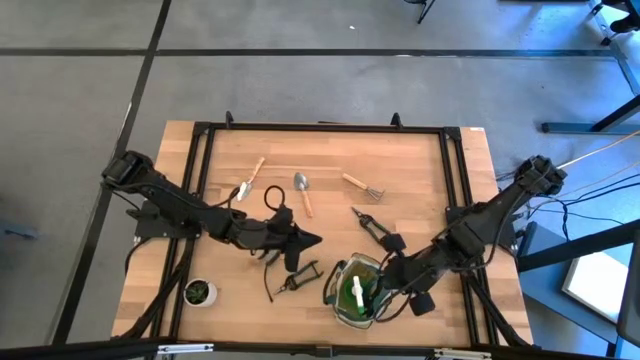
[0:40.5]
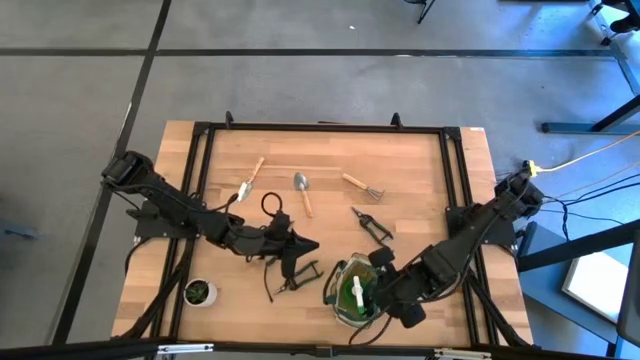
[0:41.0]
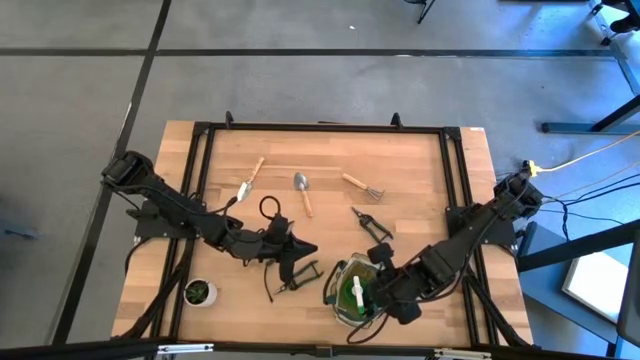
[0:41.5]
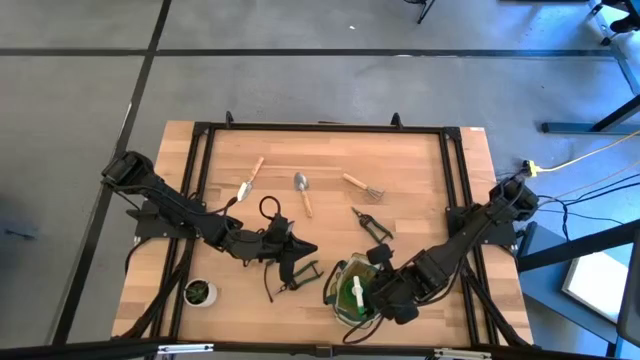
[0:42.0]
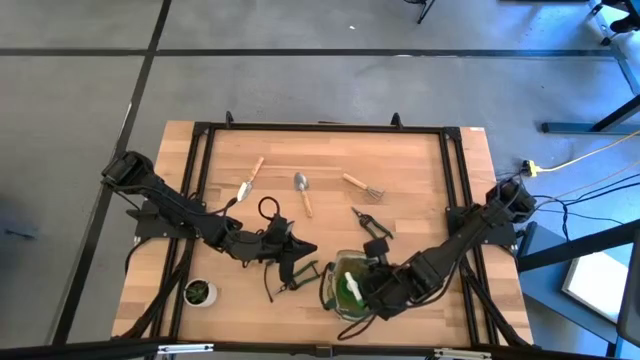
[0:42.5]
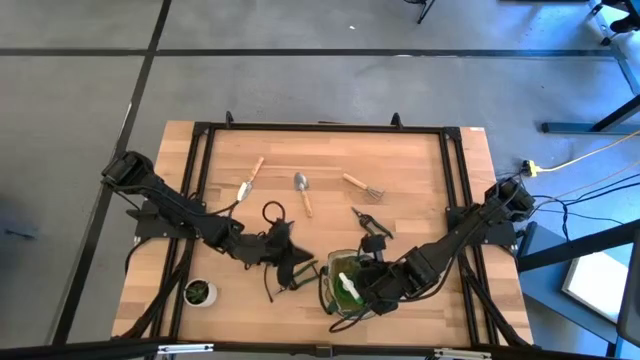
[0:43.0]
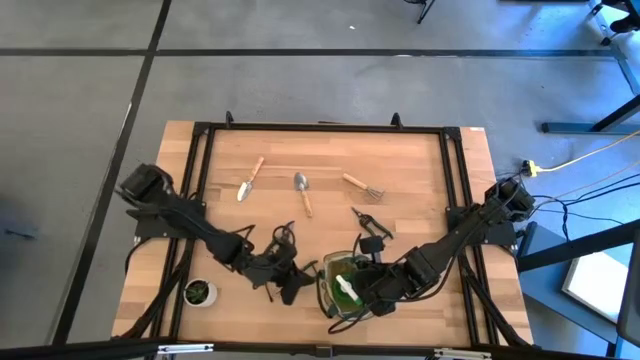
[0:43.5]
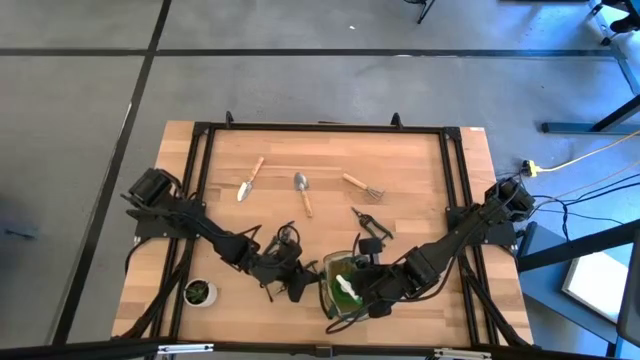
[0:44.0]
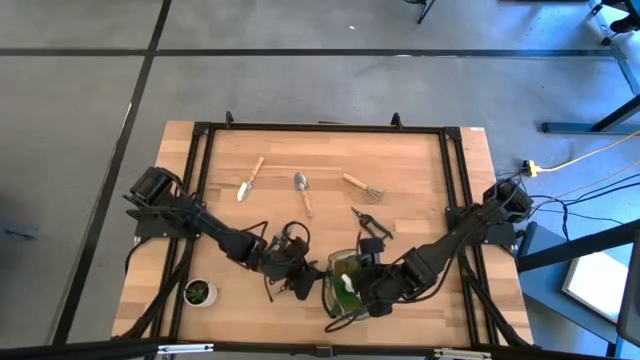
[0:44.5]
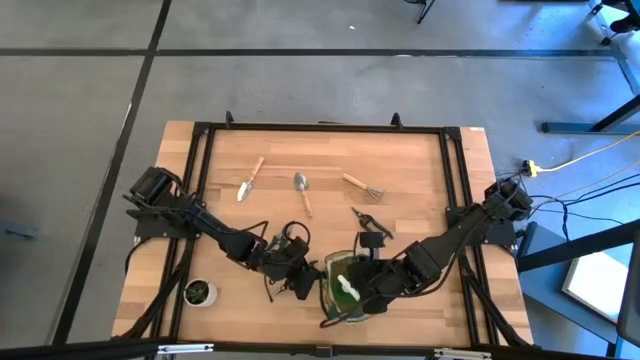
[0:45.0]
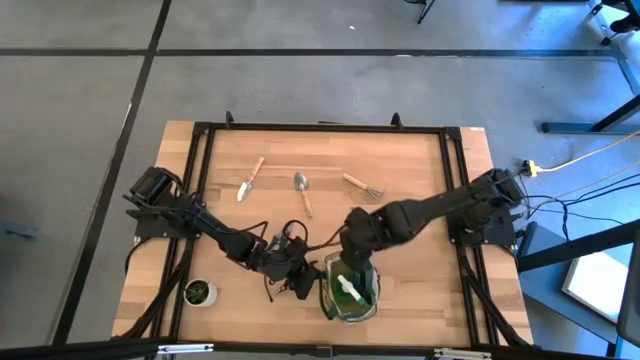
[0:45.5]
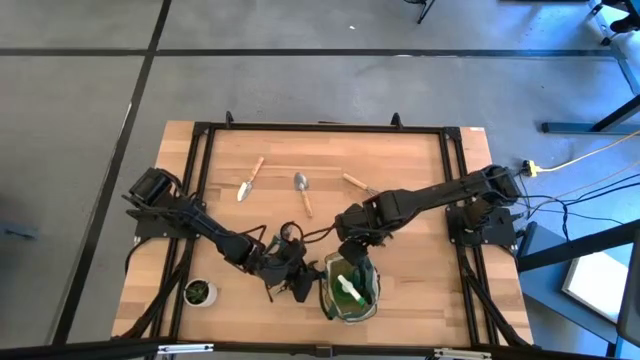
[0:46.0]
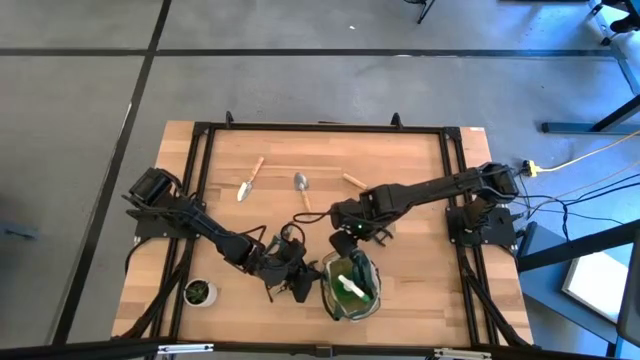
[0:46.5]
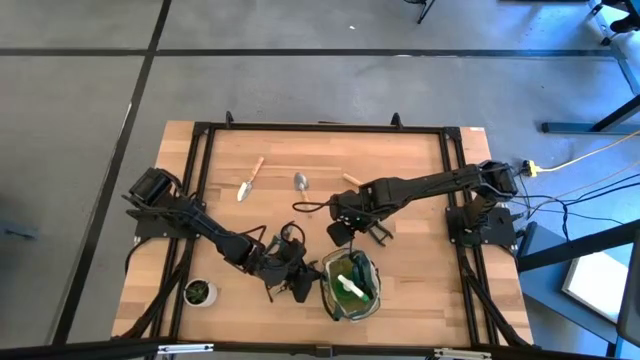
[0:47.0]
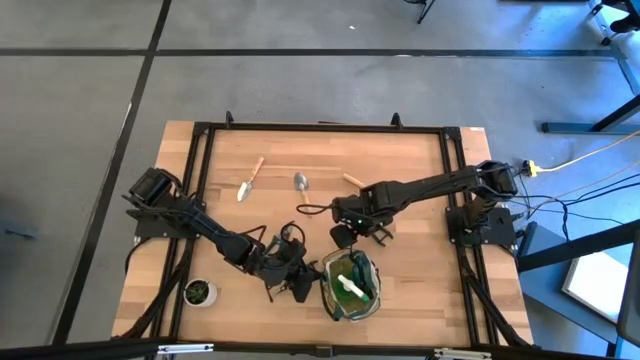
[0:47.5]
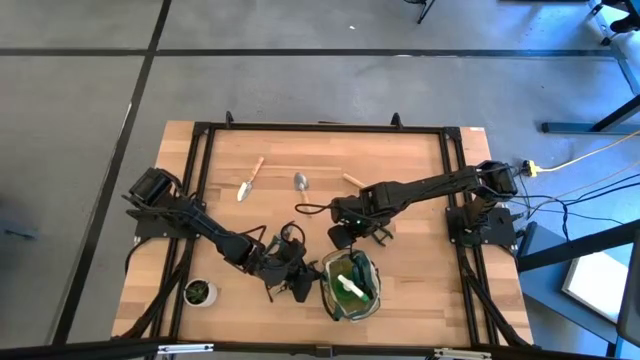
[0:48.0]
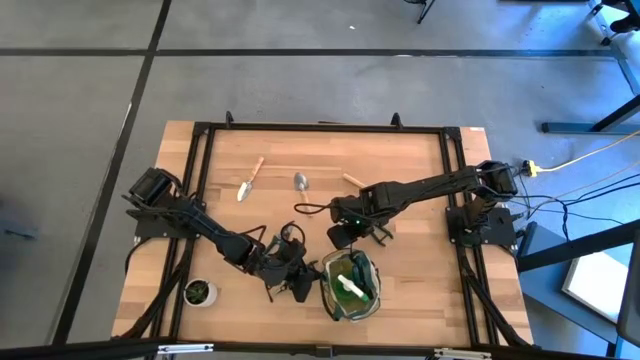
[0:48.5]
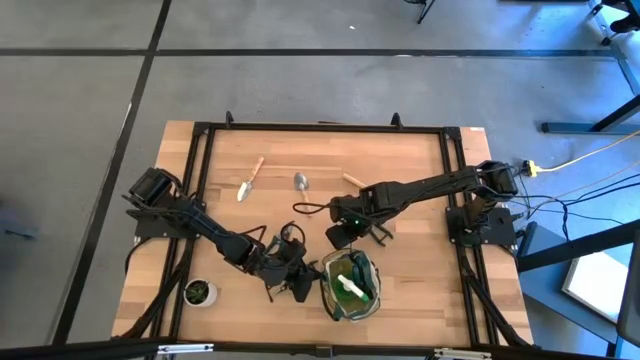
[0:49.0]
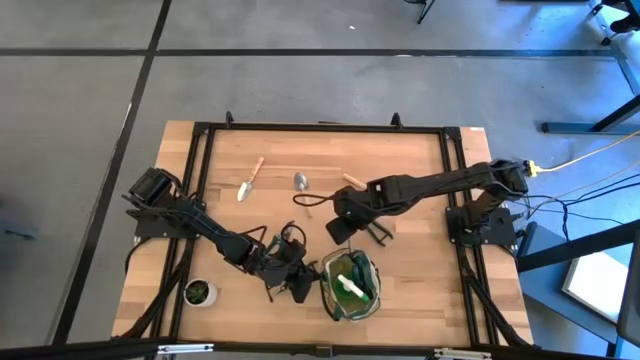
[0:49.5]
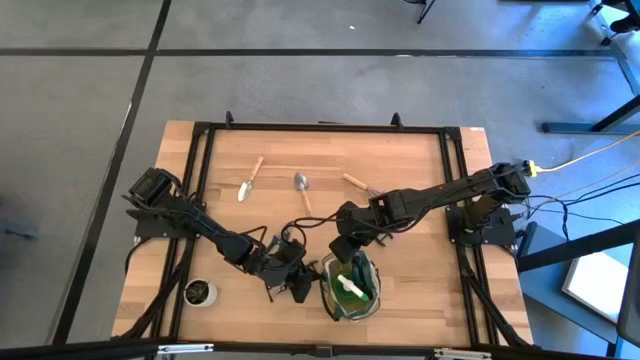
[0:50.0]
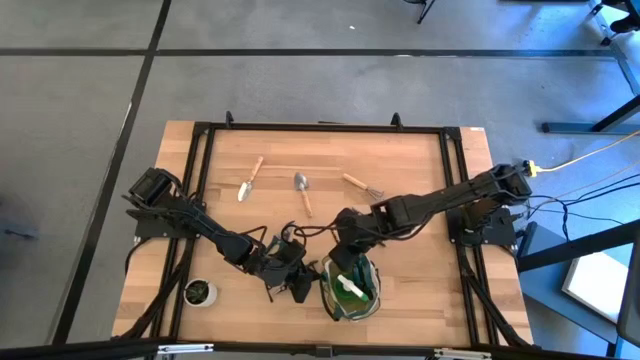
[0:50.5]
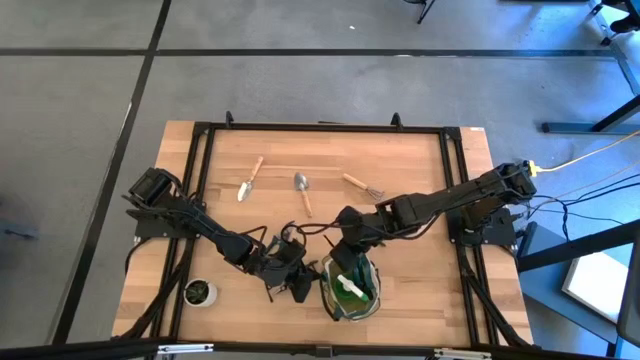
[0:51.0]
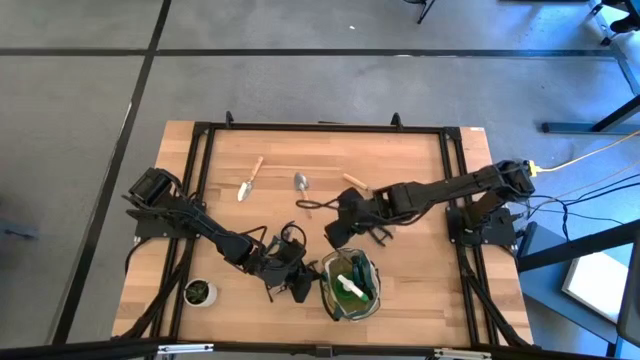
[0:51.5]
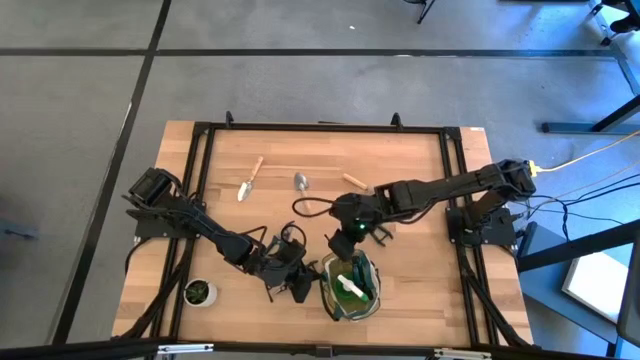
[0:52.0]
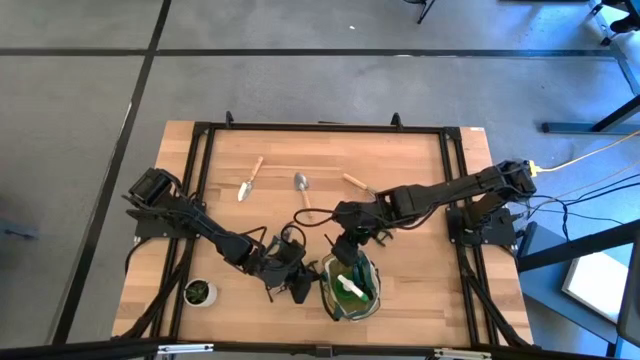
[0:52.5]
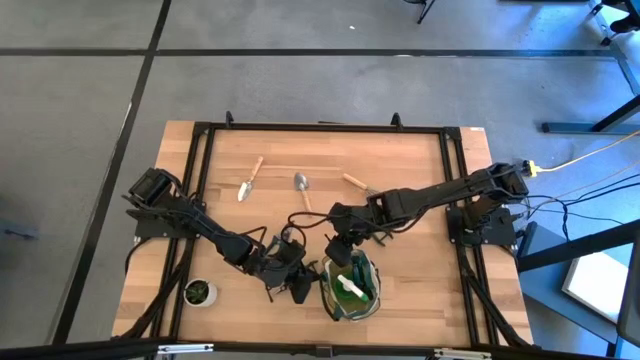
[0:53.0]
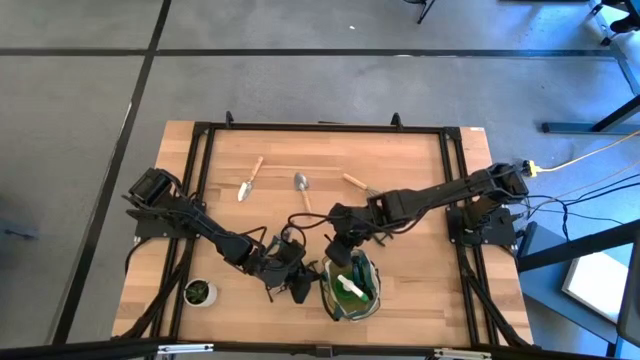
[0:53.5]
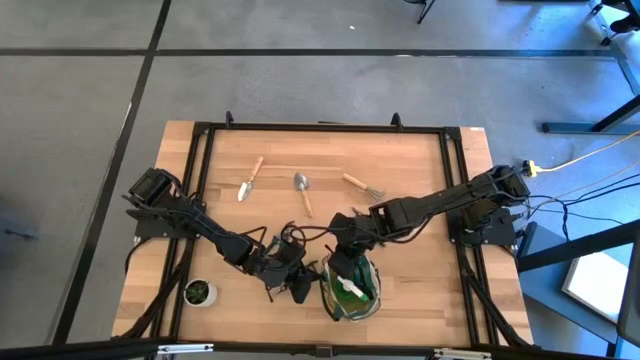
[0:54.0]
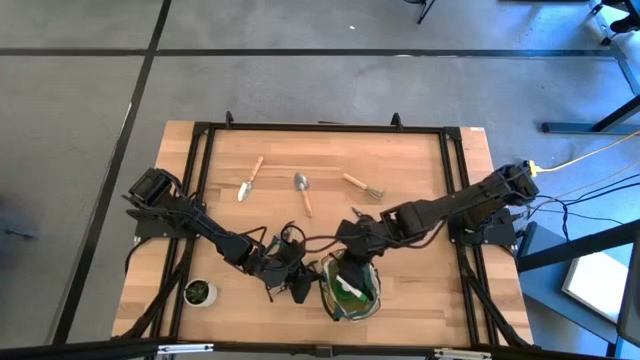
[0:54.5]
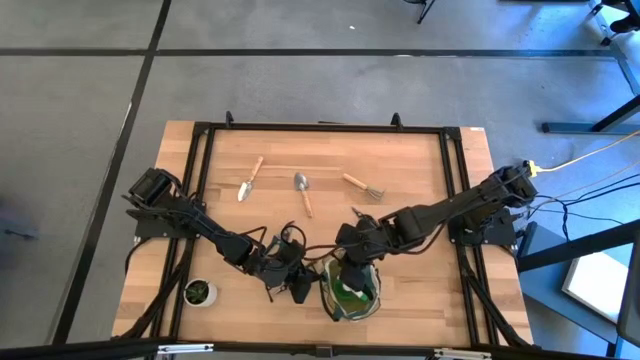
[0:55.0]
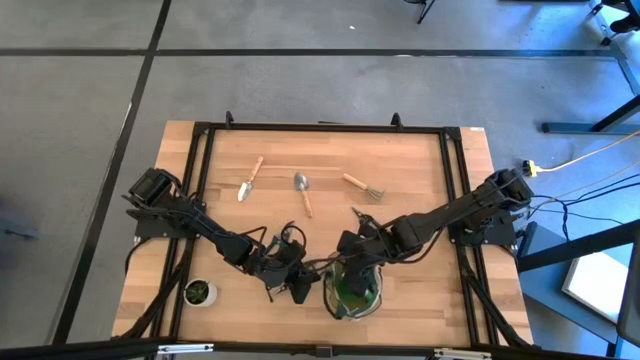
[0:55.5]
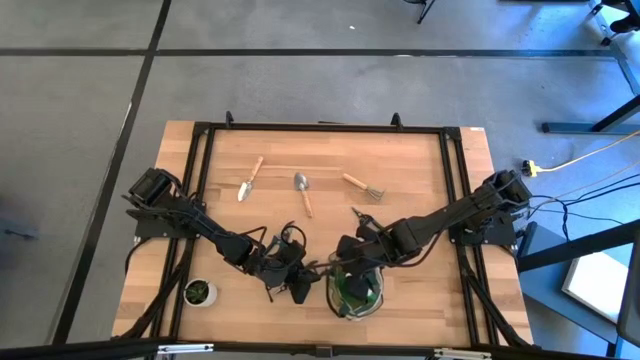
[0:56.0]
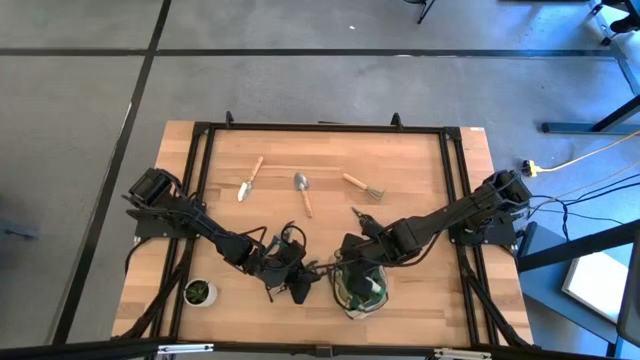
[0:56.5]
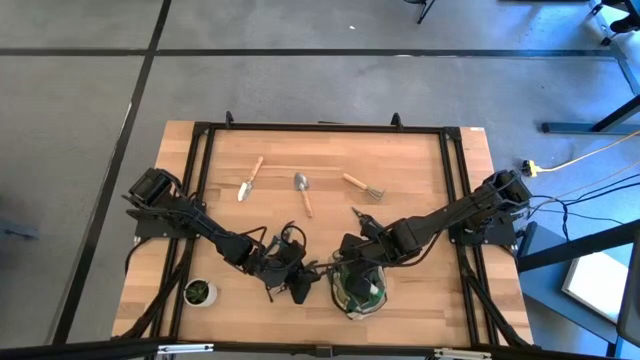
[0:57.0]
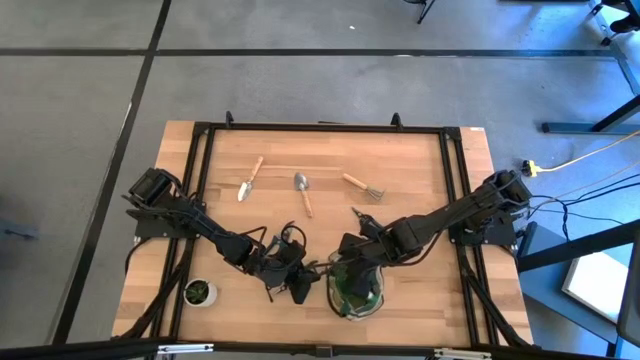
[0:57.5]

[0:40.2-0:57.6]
Task: Pick & Place Garden tools in Gardening bag
Put the green shear scissors into the gardening bag

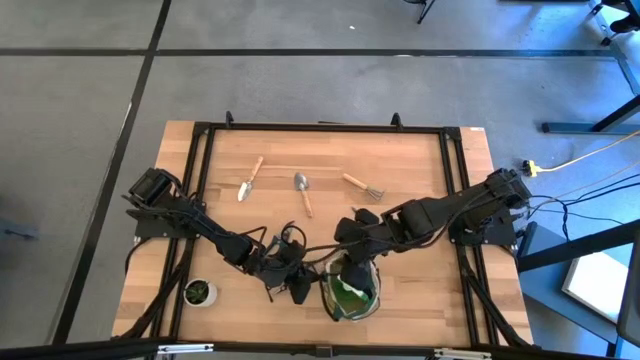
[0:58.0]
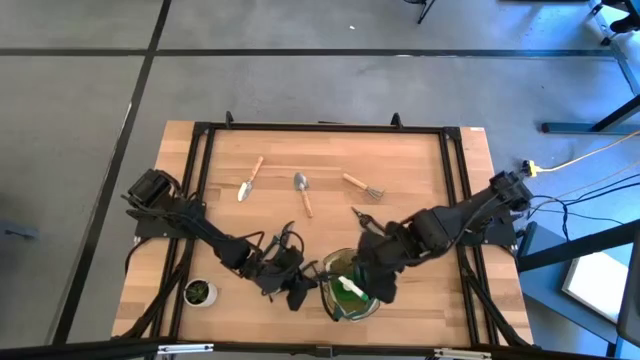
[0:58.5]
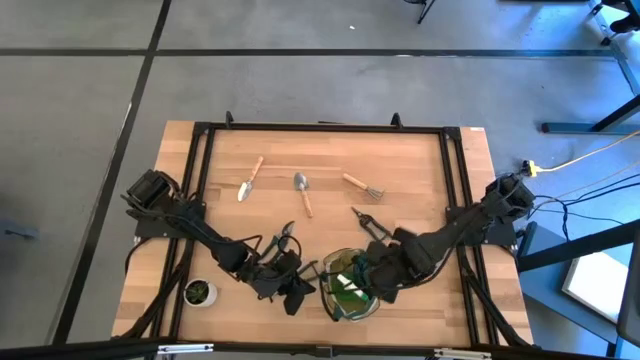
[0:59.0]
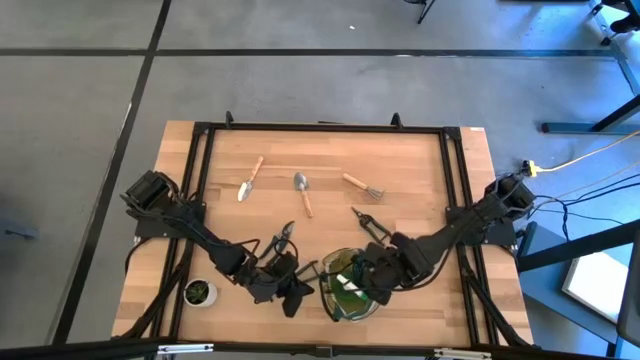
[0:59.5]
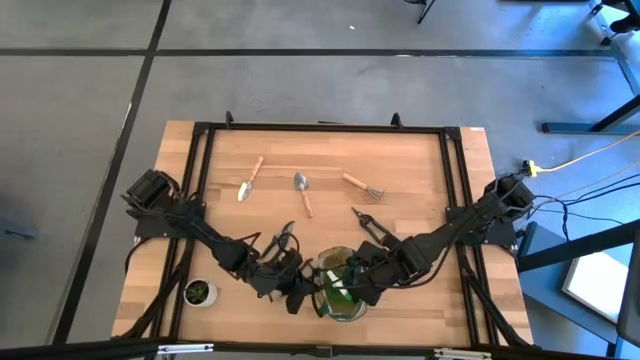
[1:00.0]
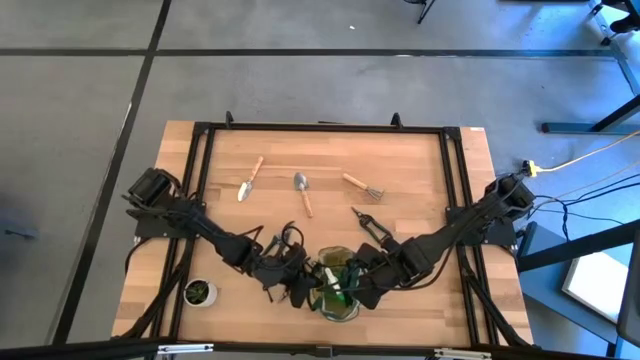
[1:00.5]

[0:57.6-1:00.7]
Adjust the gardening bag
